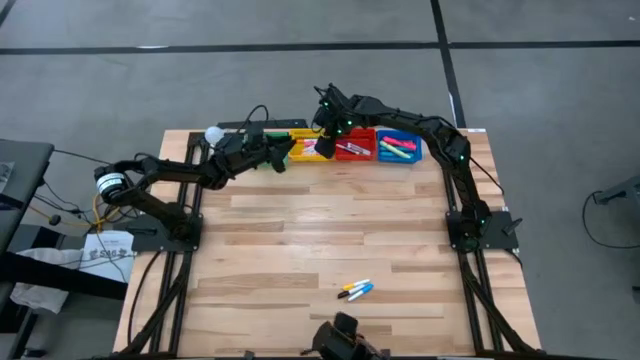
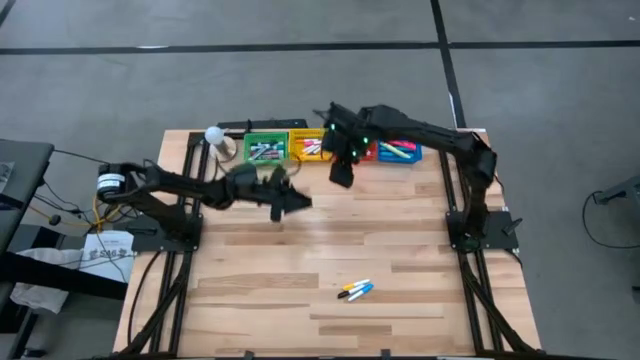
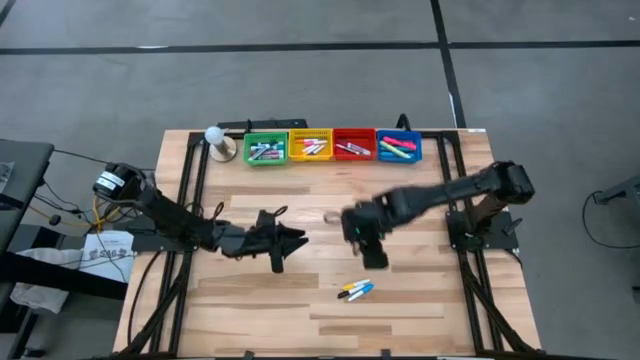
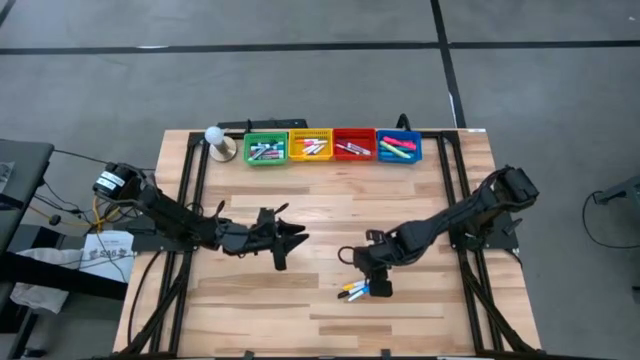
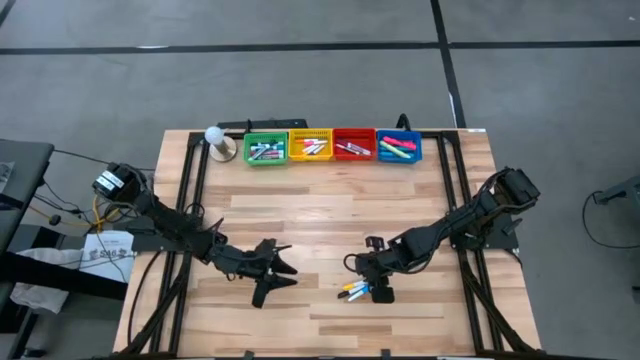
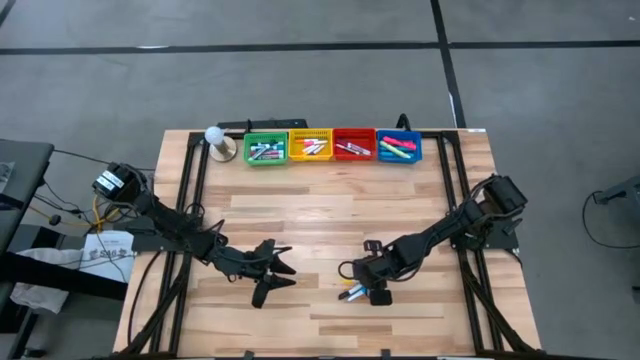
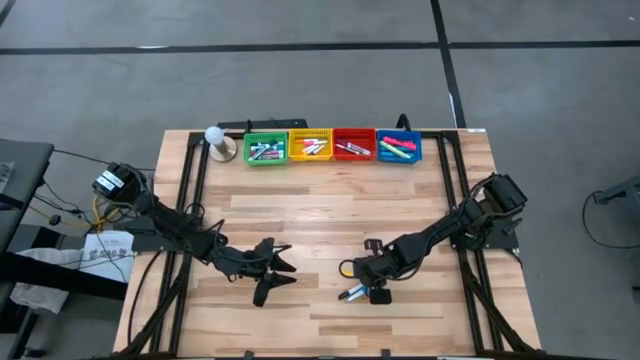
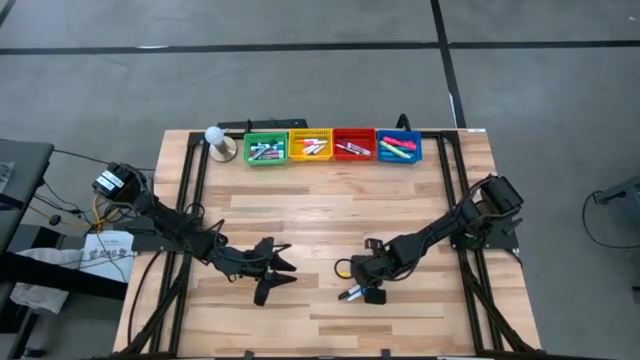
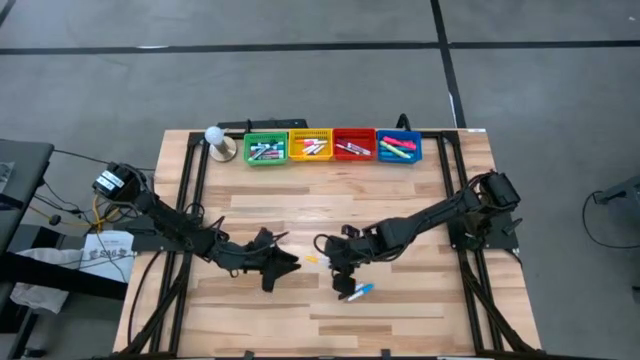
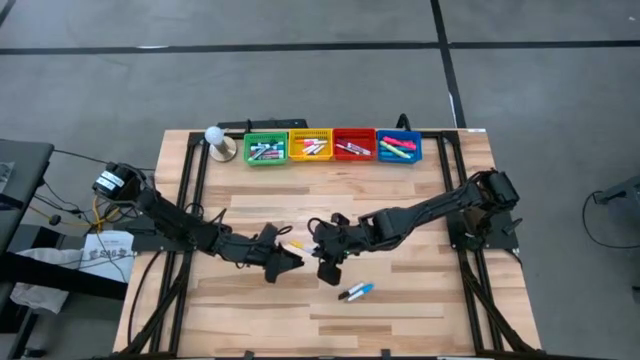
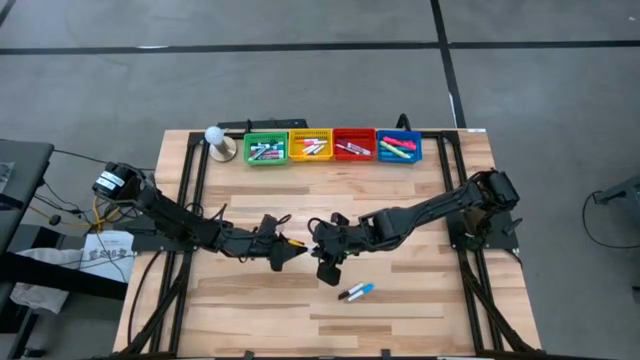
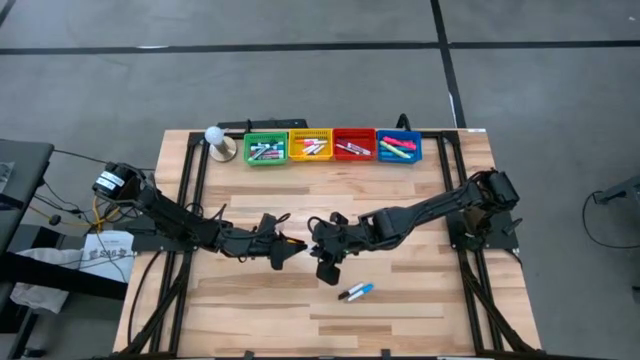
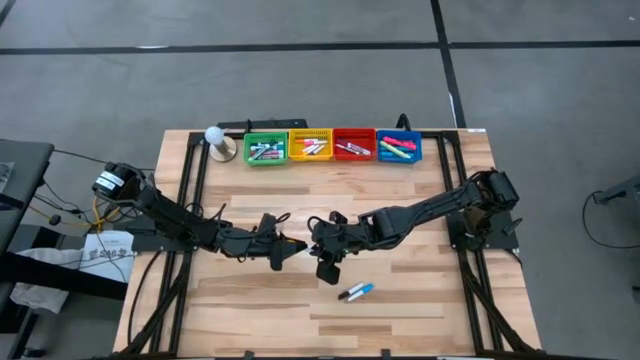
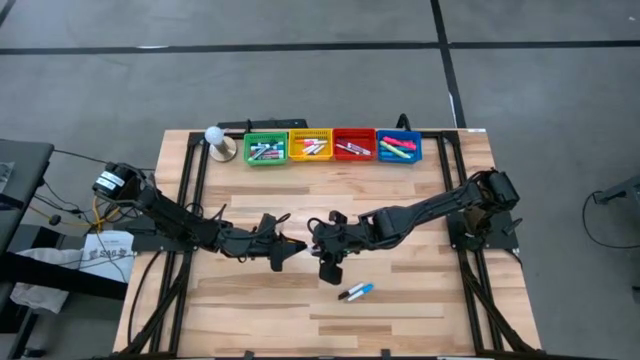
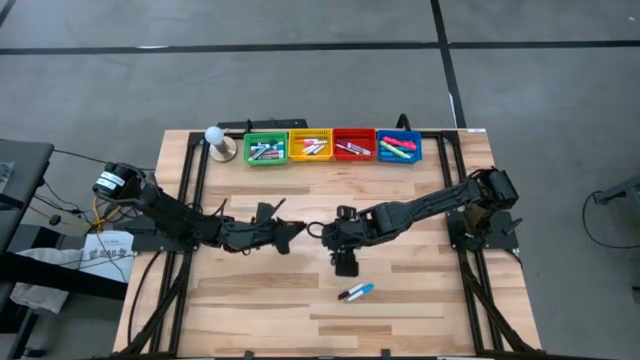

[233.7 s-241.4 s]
Task: Pick & Place Markers
Put the yellow highlighter pen into the yellow basket

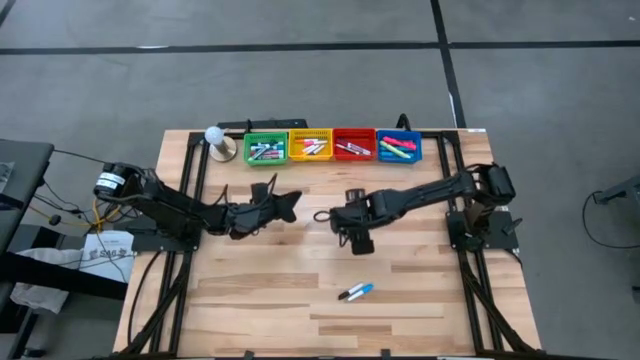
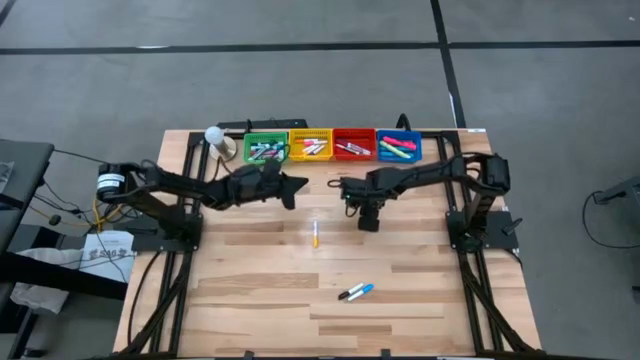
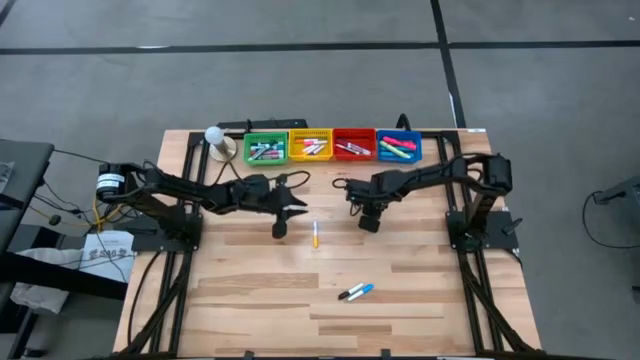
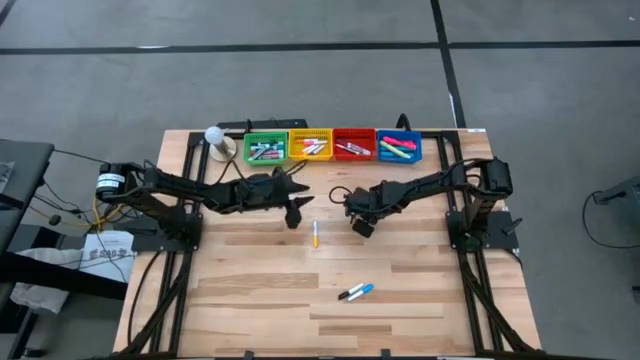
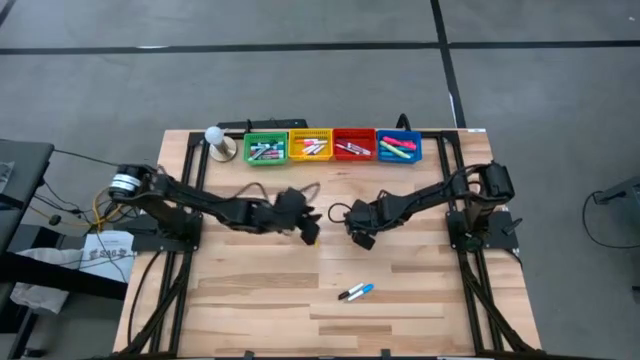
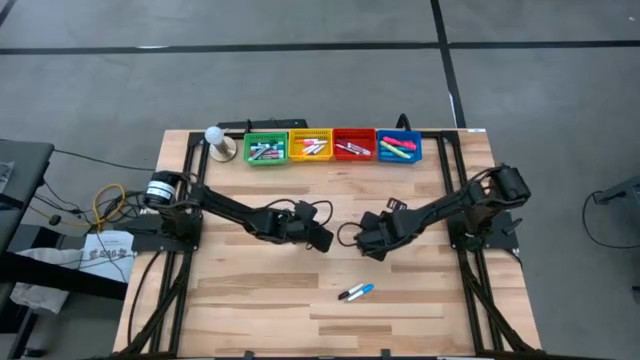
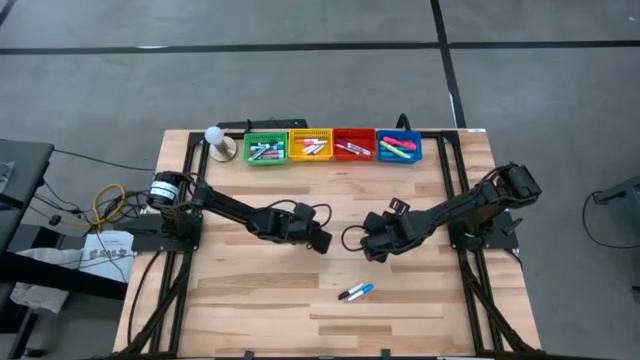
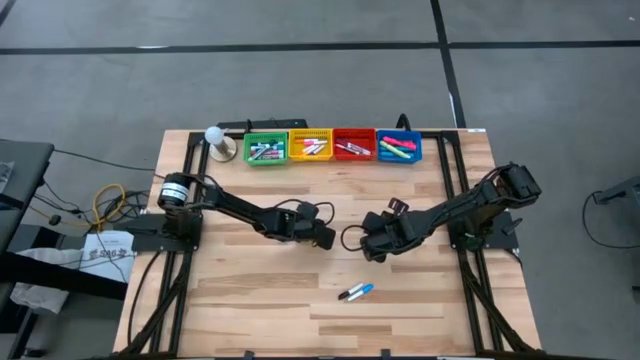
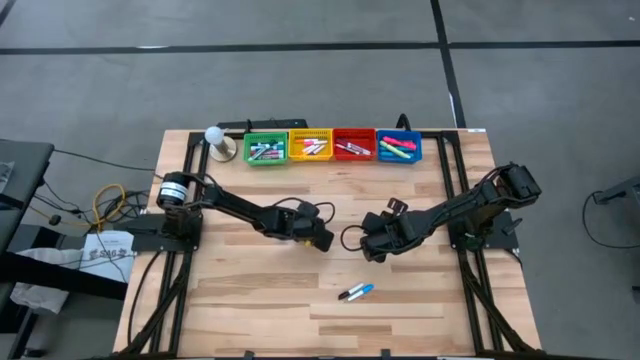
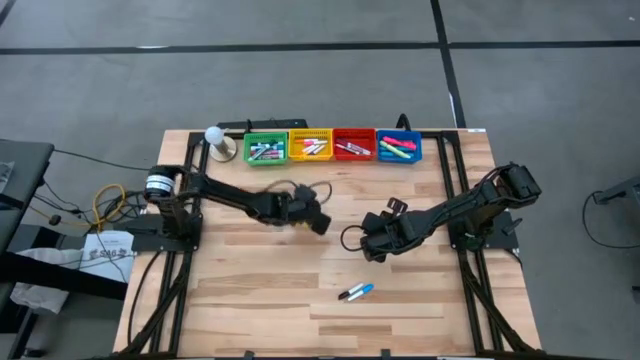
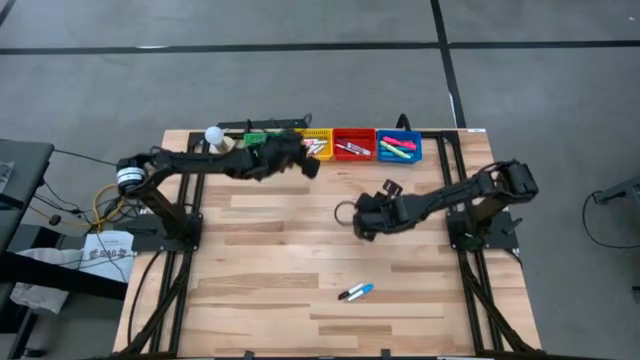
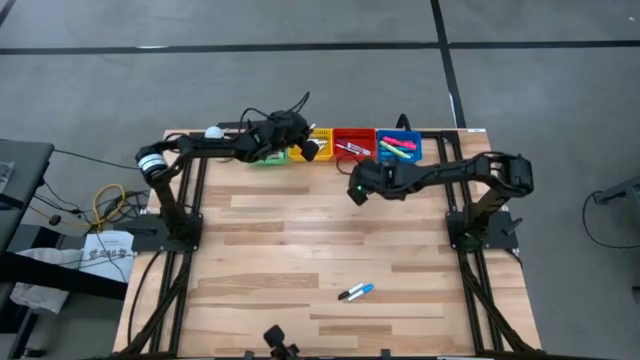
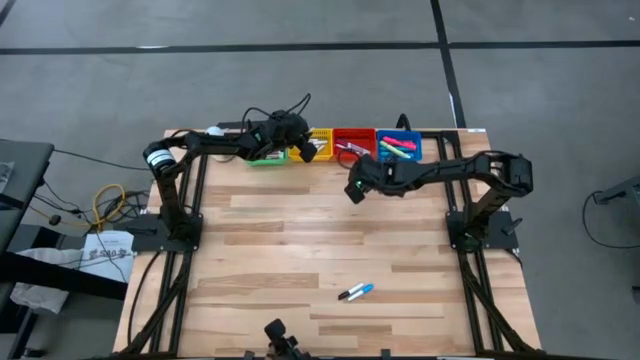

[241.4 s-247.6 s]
Put the yellow highlighter pen into the yellow basket

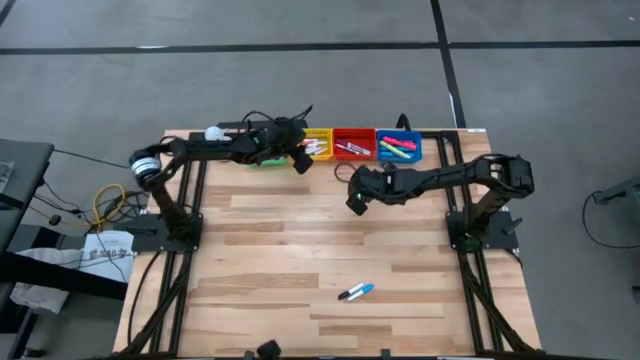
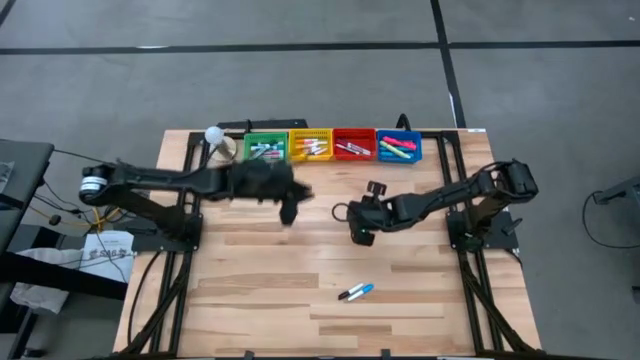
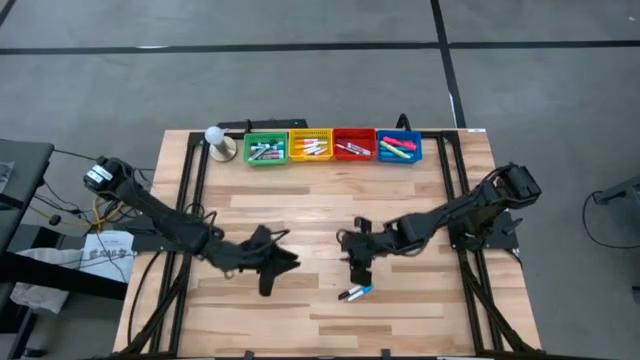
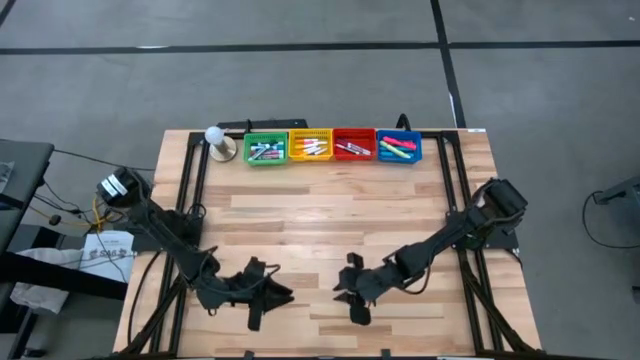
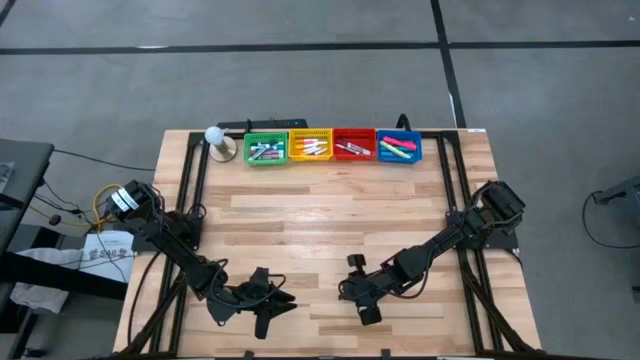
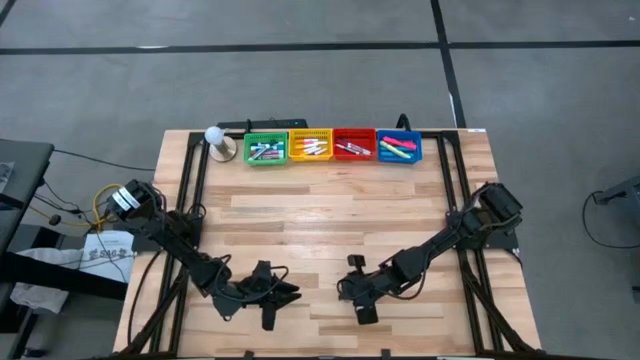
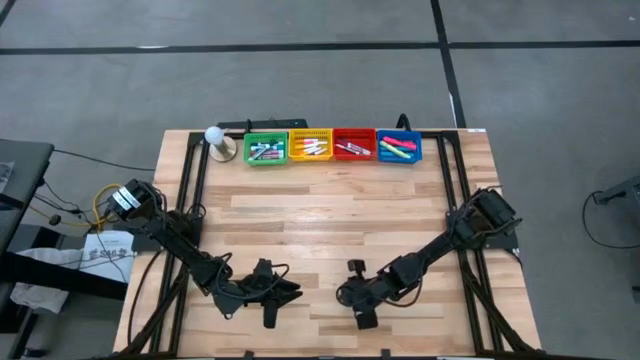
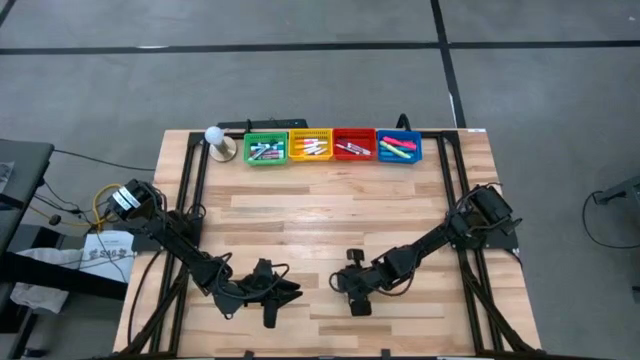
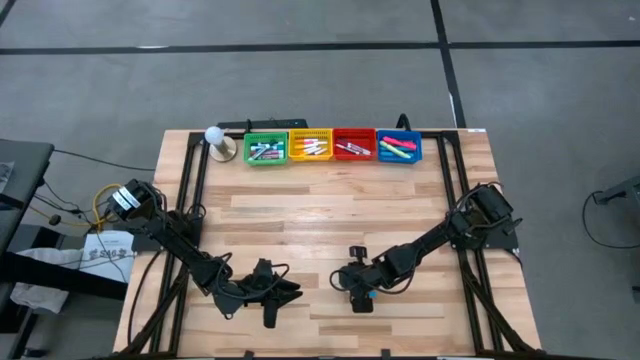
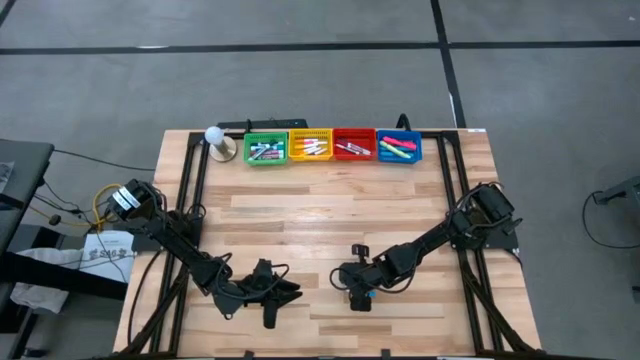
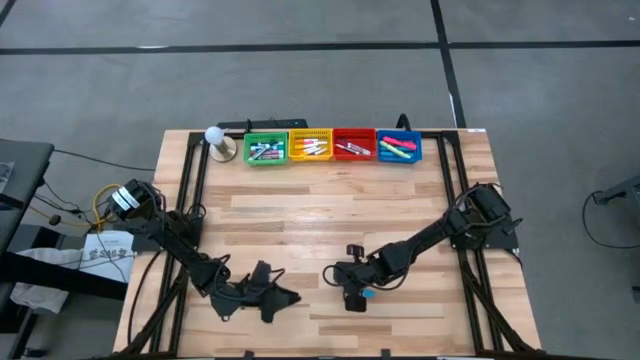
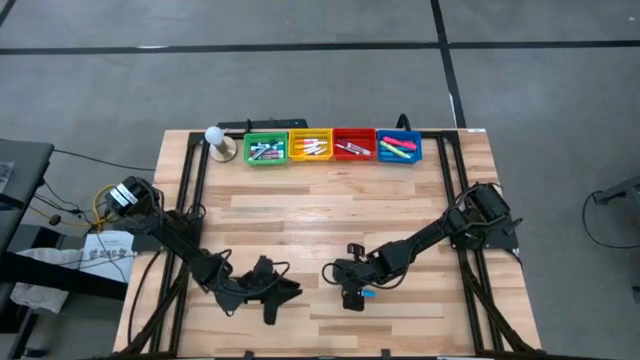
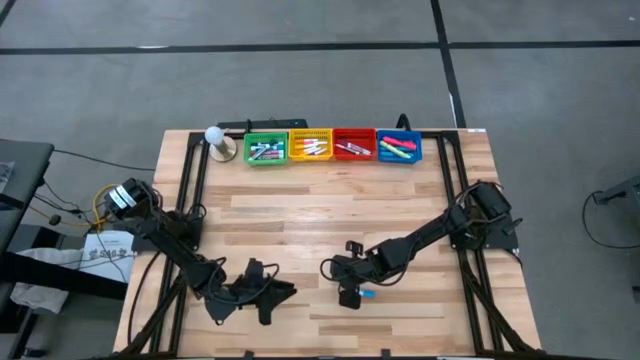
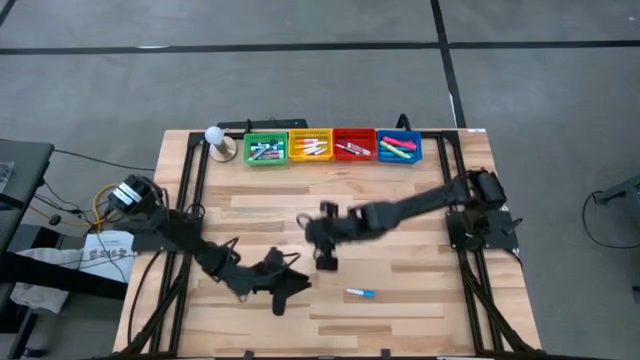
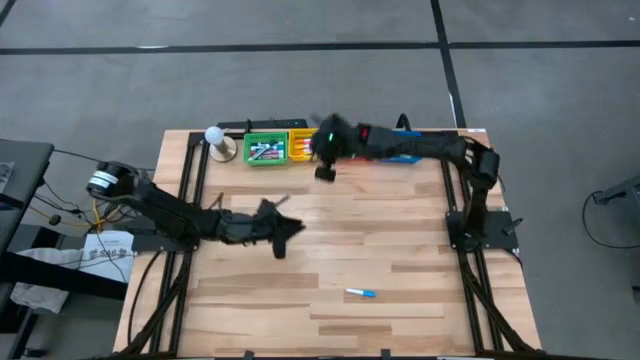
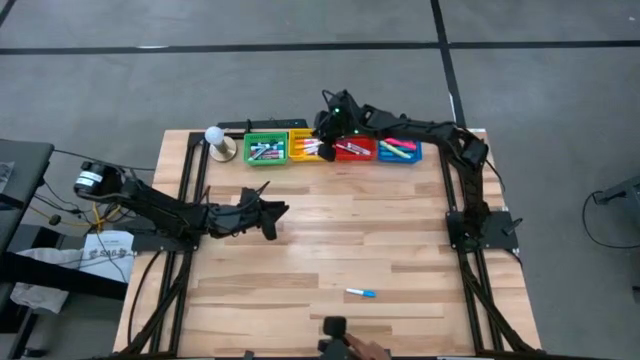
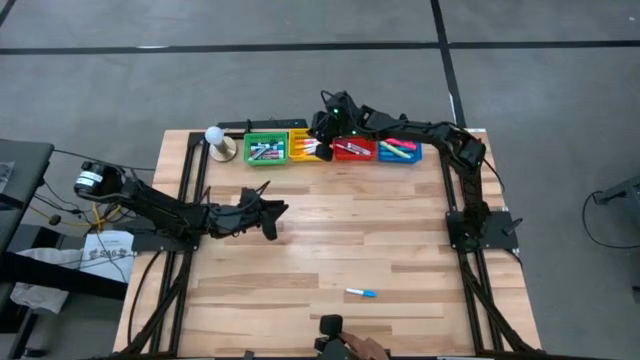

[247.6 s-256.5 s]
Put the black highlighter pen into the yellow basket
